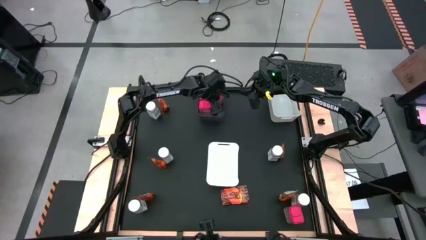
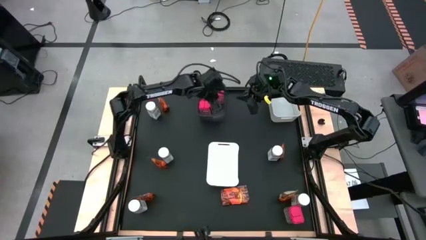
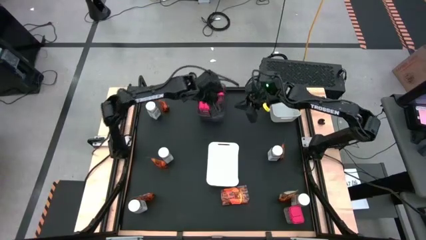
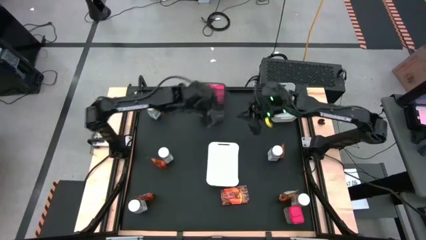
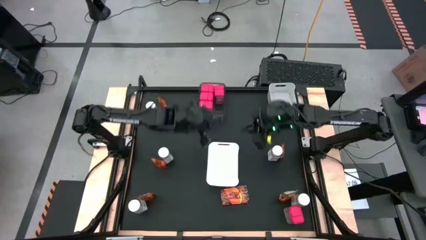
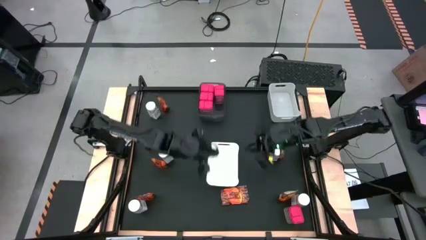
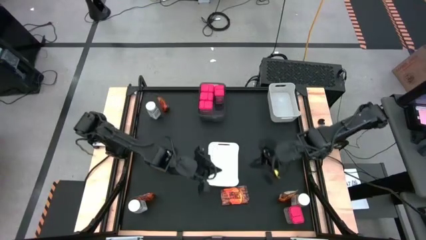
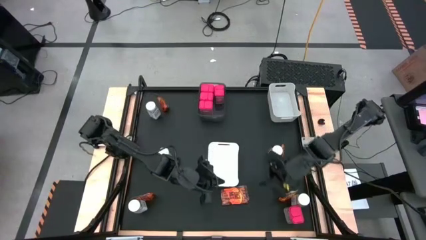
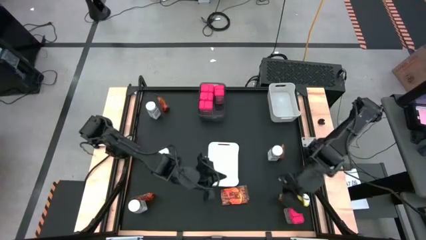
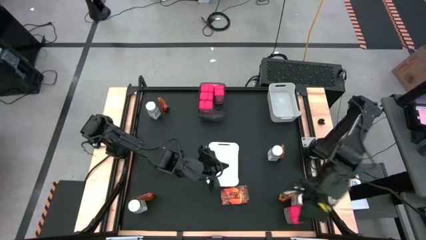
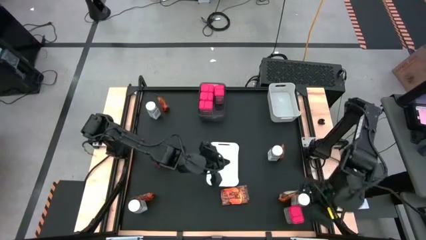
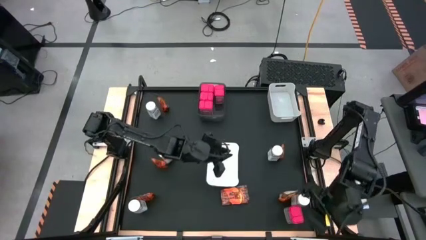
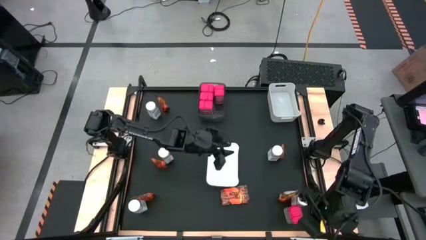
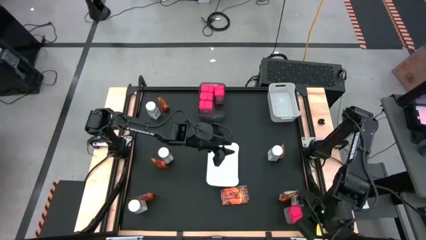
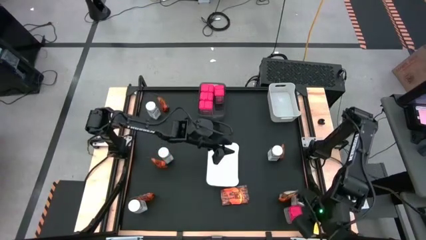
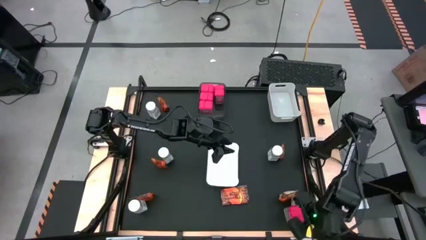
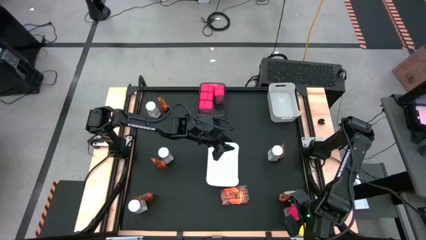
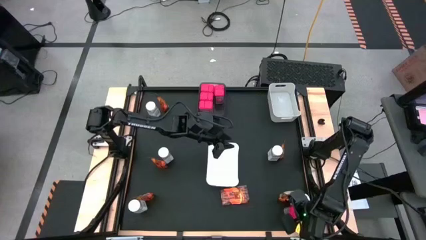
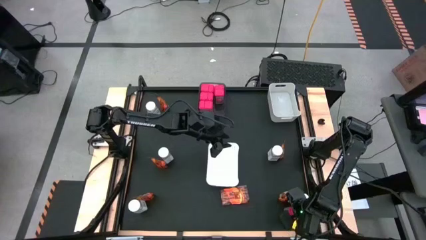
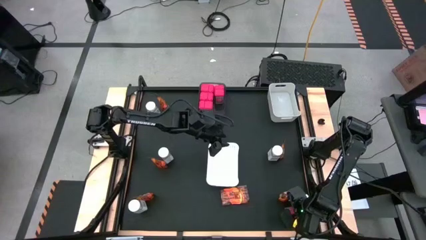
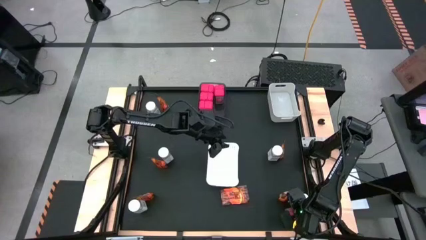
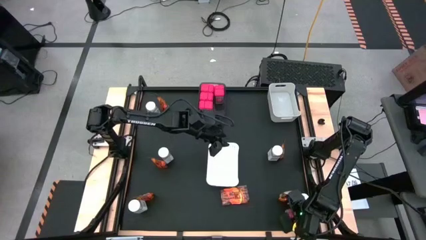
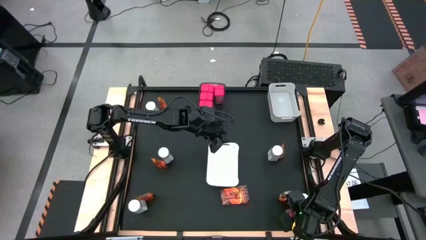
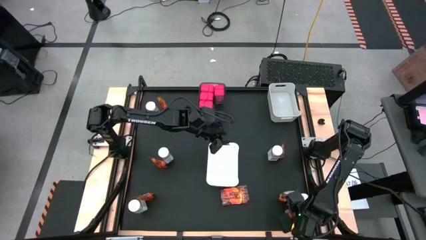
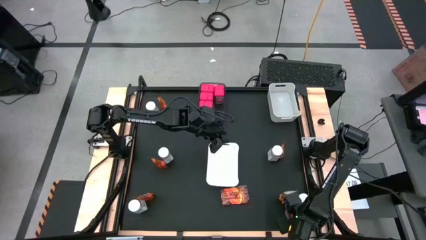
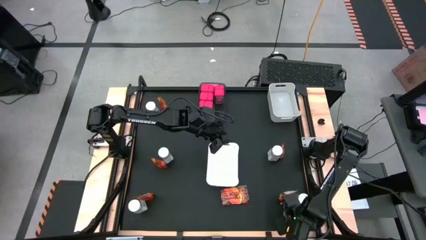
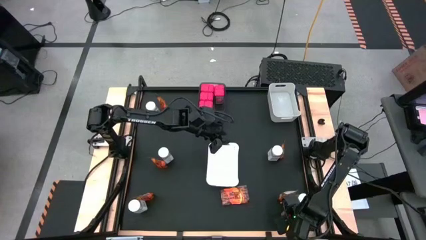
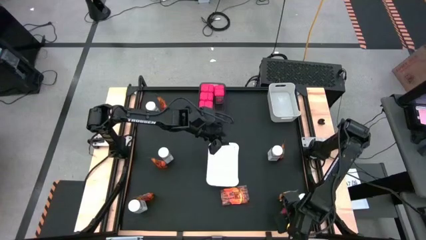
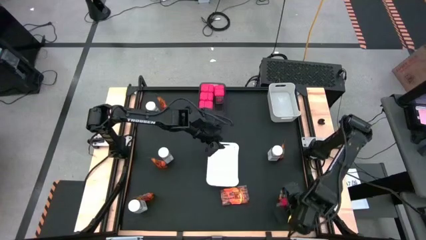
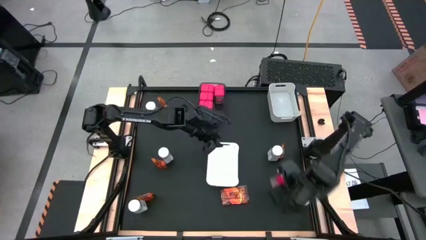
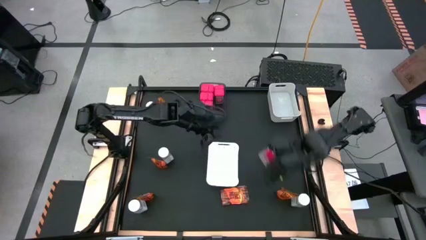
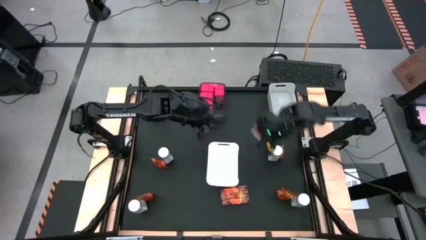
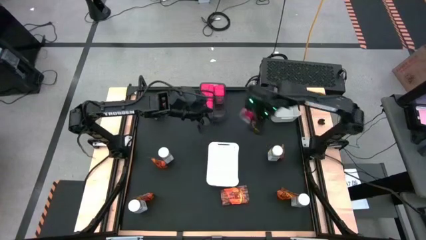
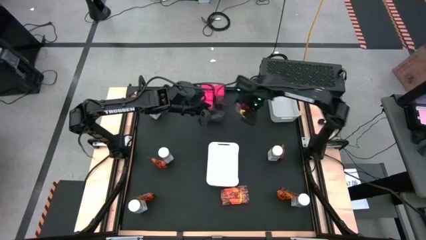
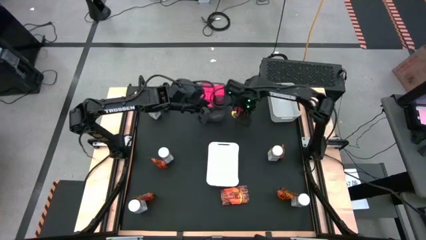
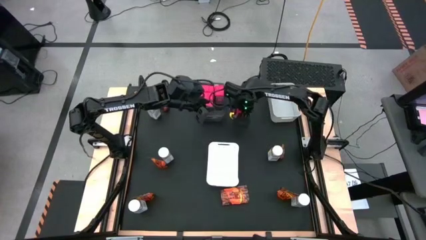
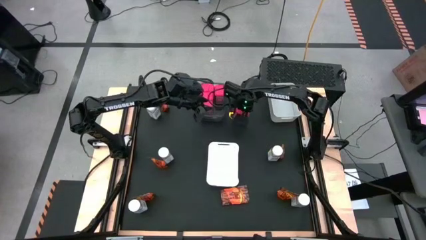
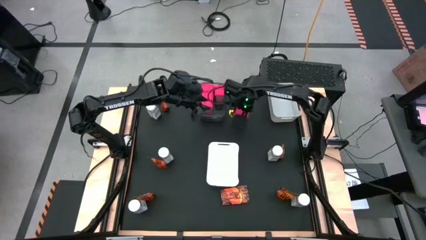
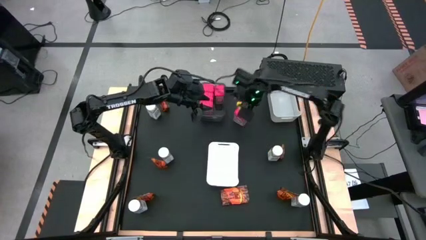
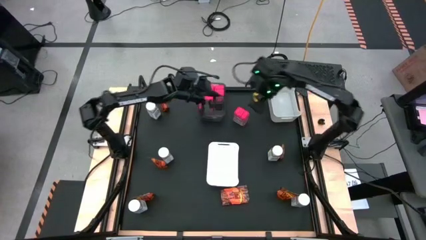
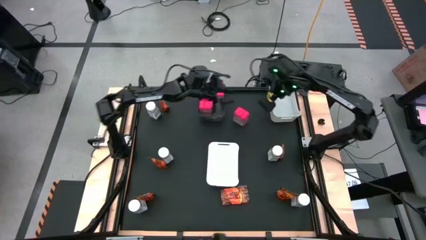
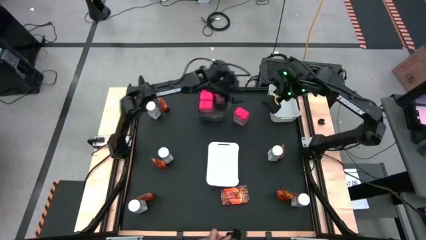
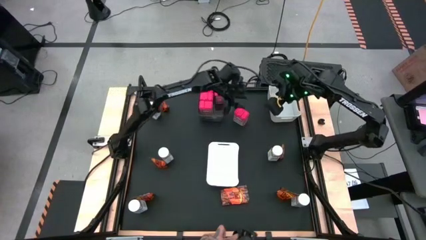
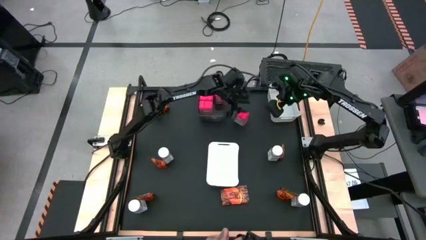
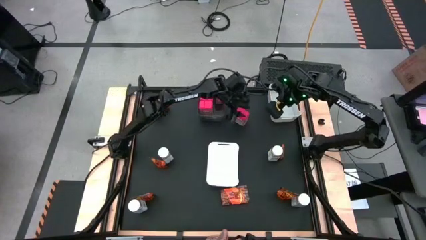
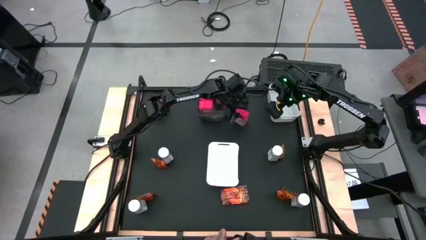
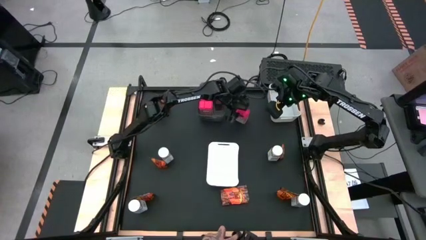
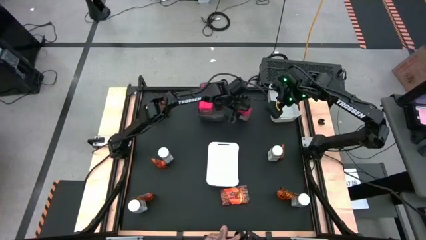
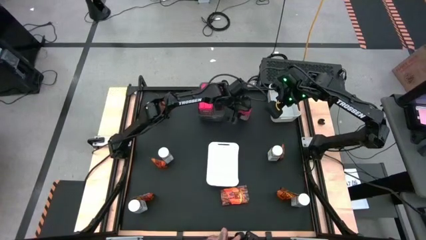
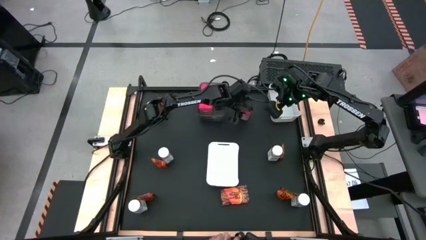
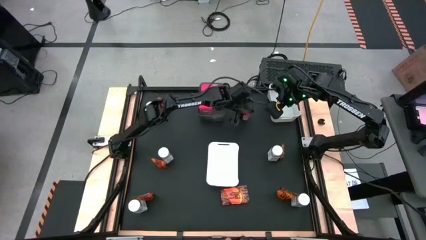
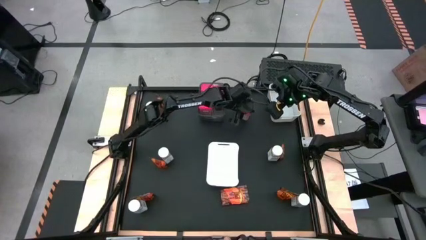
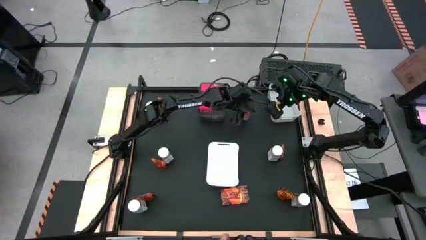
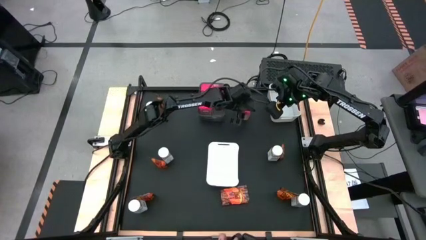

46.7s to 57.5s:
Task: Sort spices by type
Put the red seasoning can into the black bin

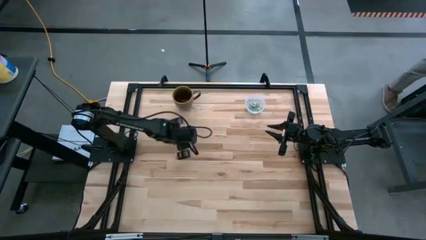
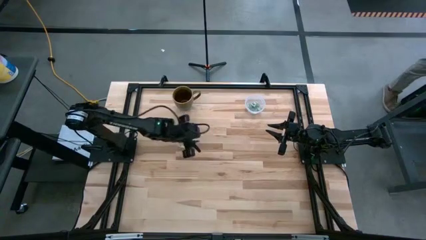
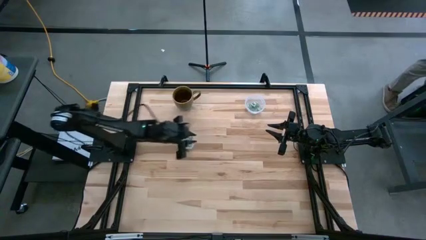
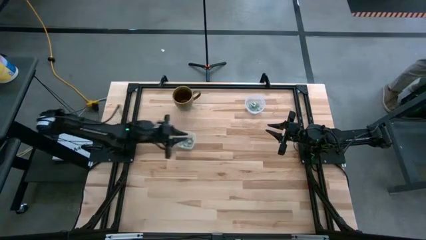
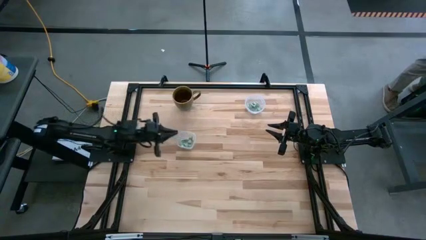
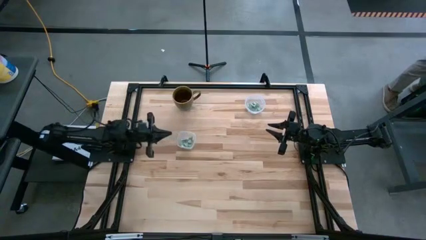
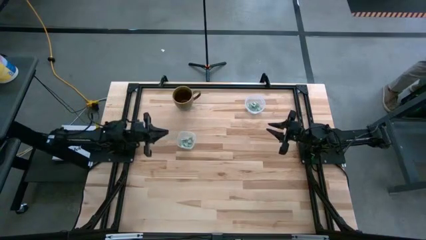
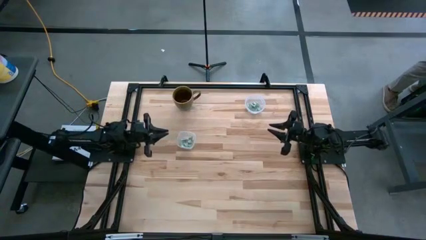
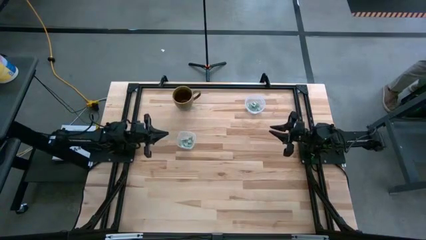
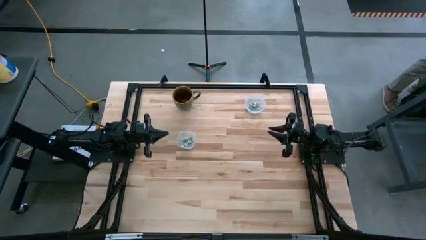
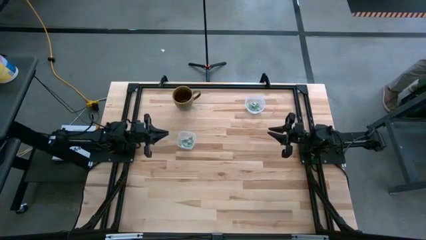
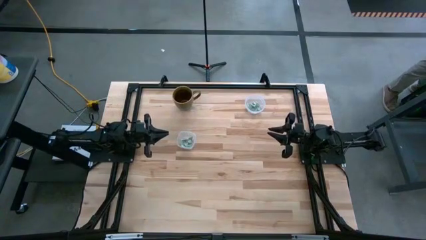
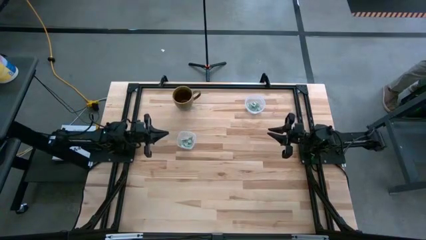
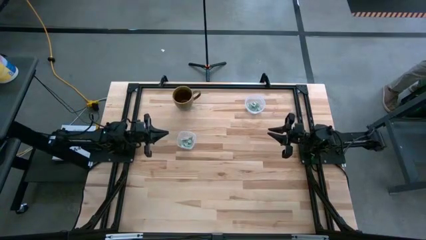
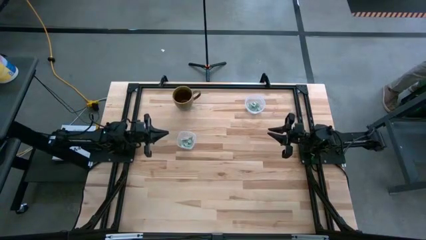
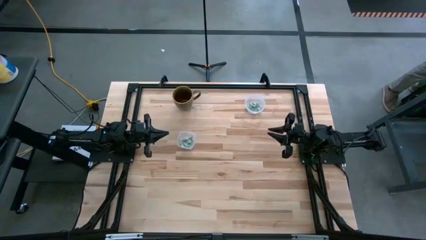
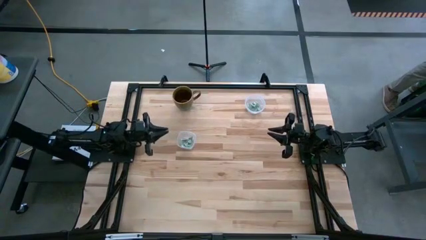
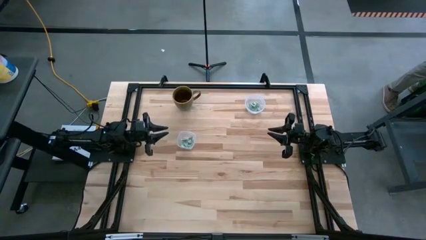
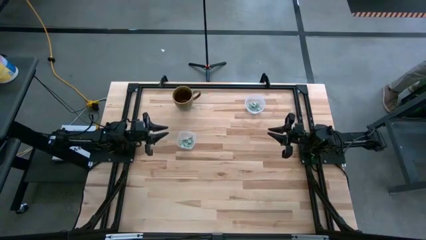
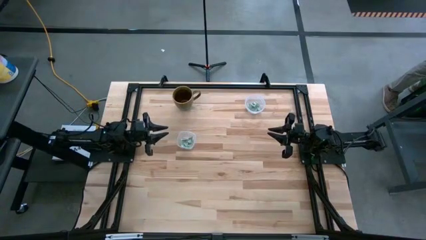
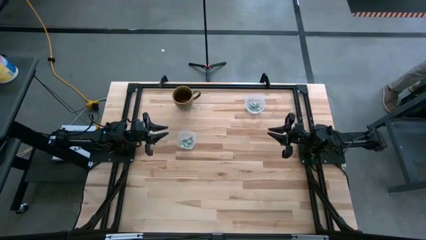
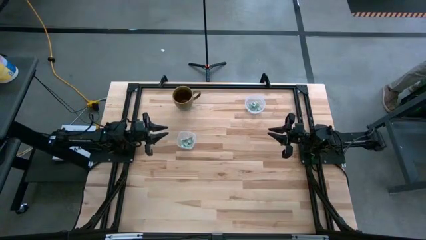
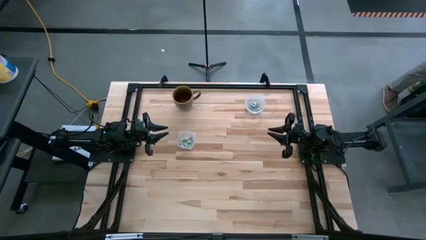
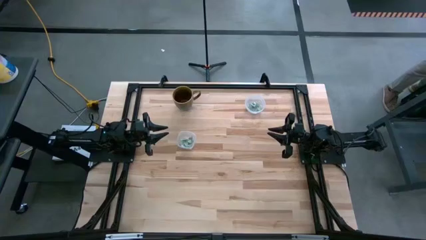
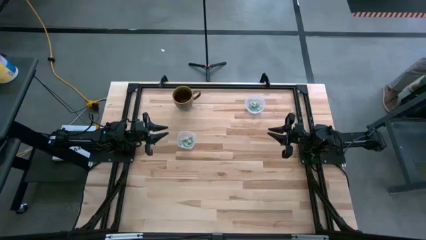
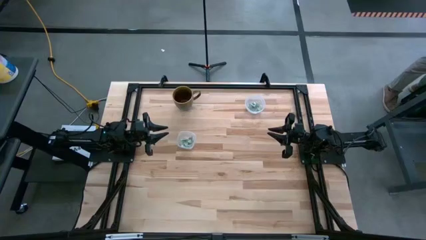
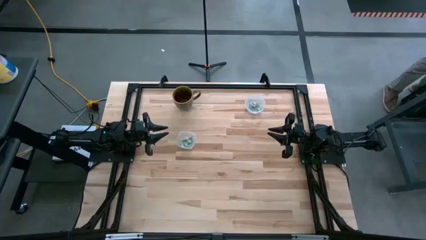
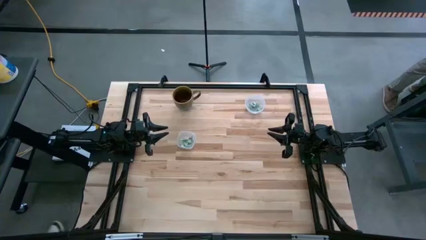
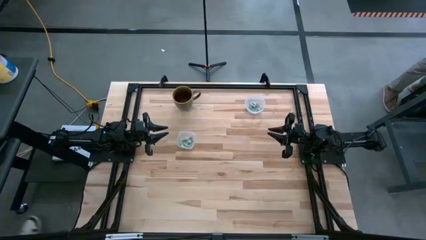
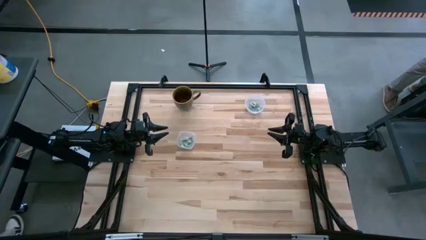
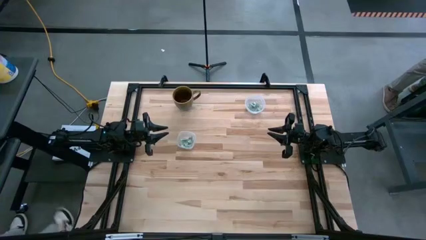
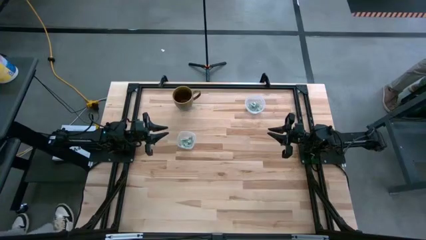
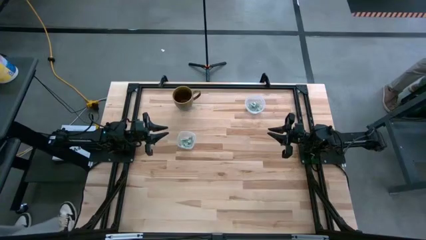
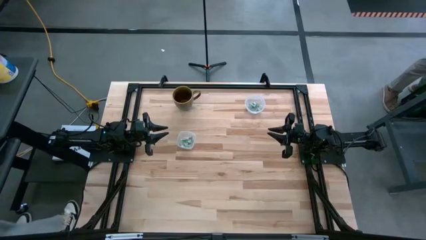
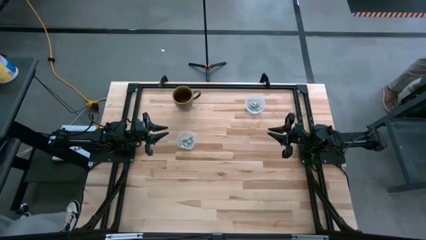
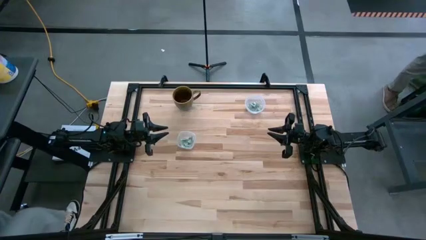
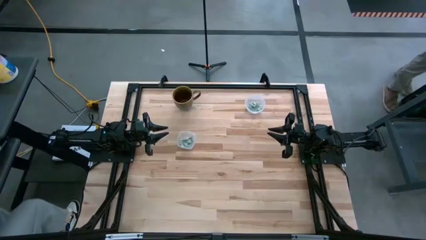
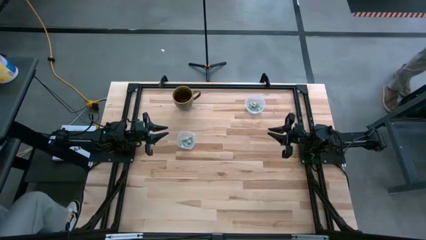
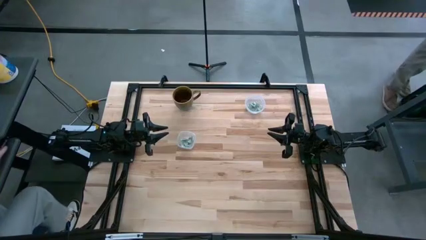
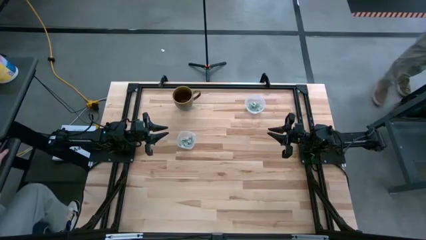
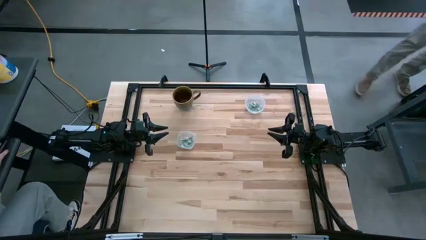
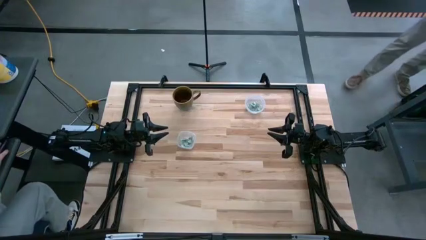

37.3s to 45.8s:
Task: Pick and place Stevia / Truvia into bins
Return to Home Position
